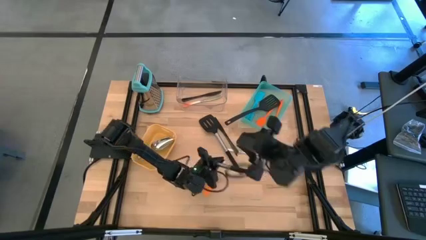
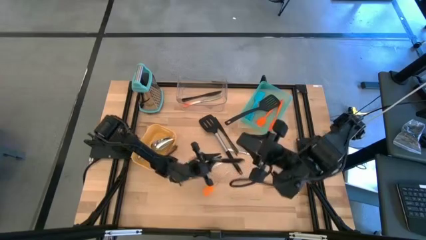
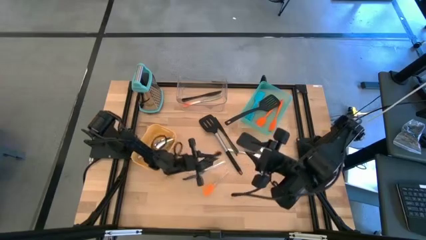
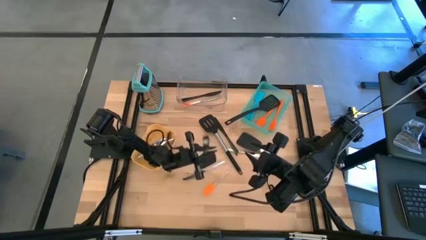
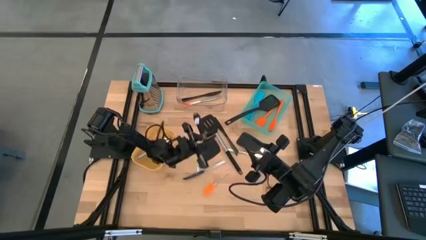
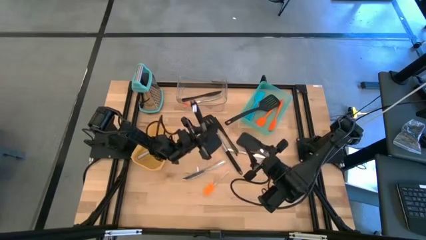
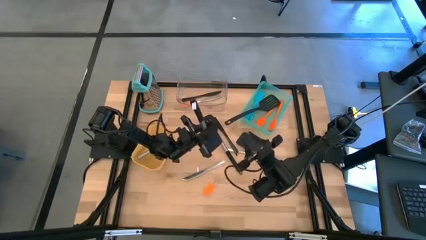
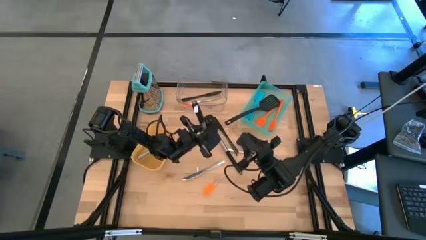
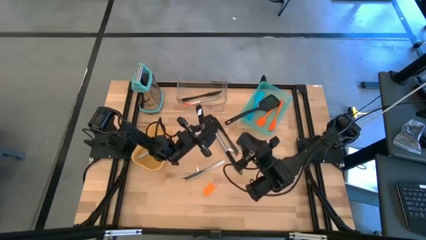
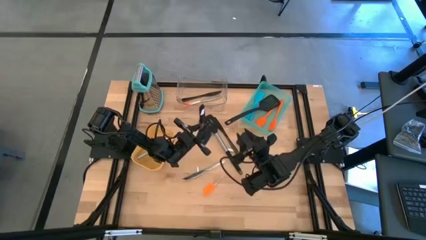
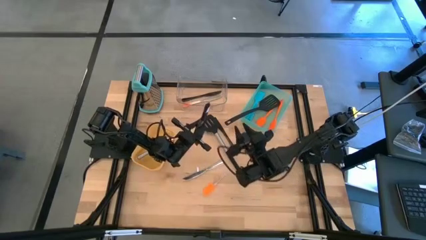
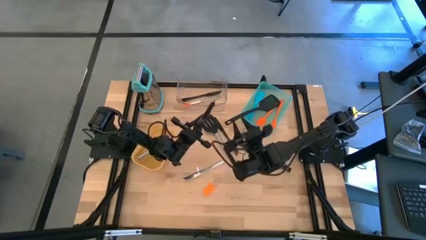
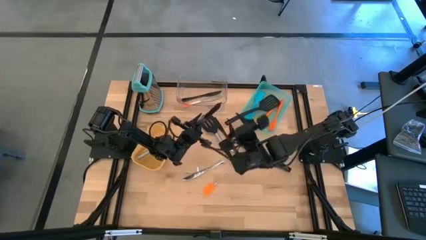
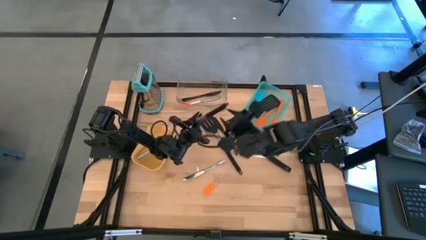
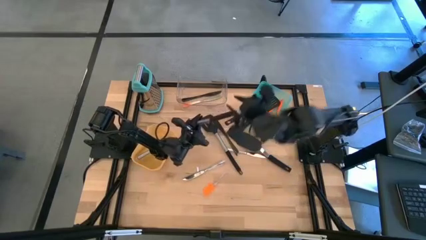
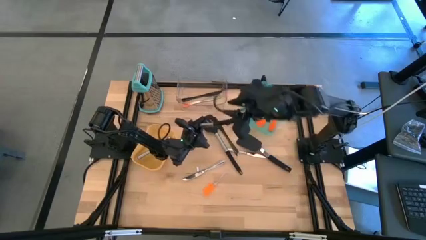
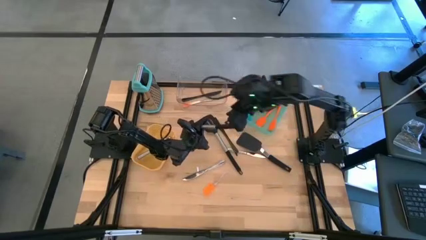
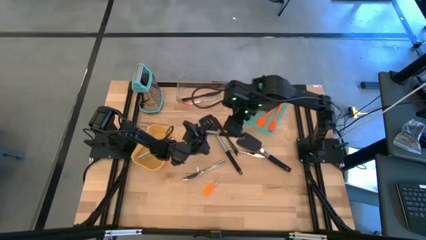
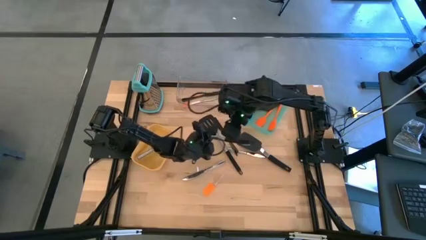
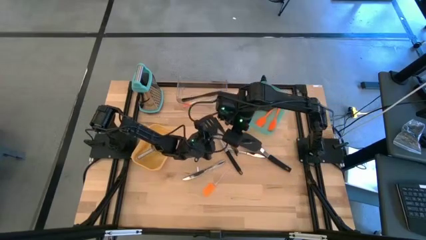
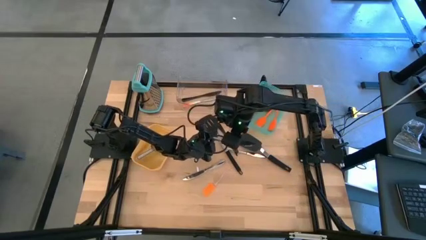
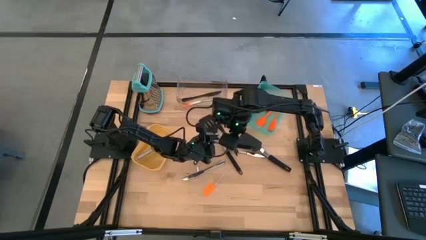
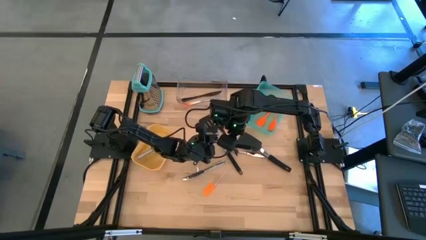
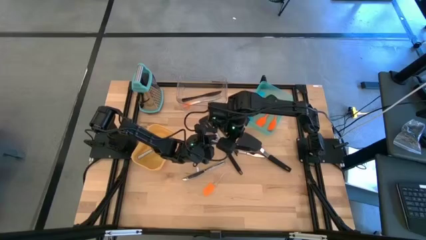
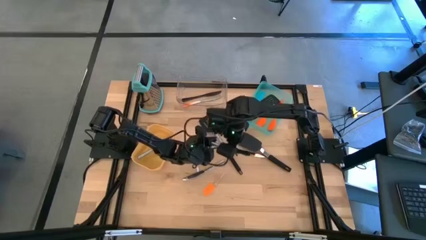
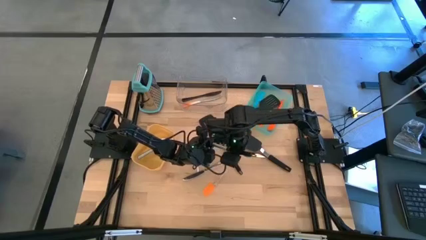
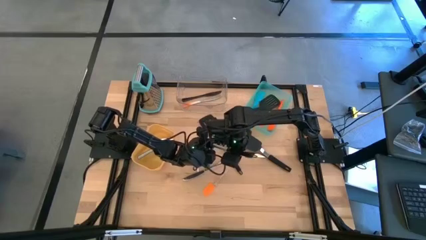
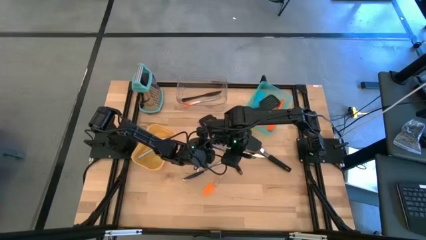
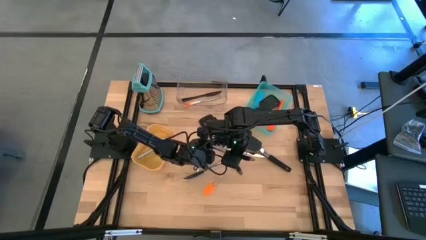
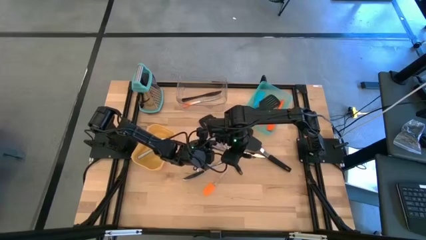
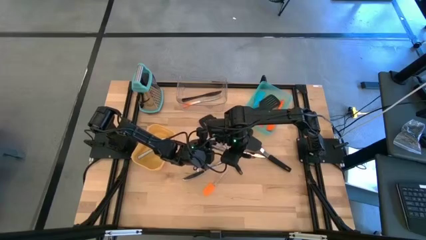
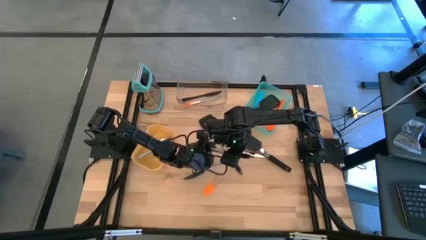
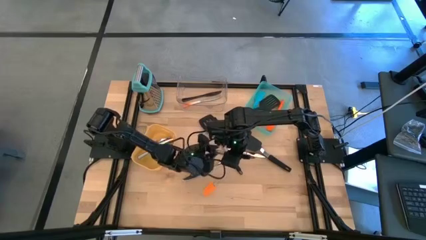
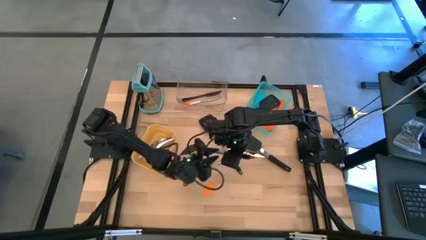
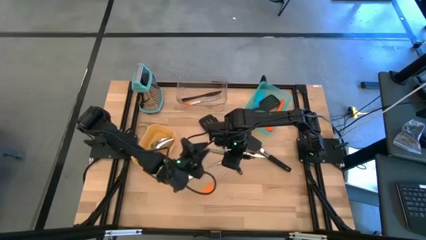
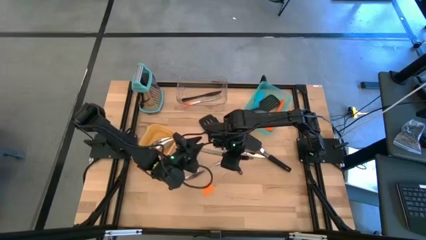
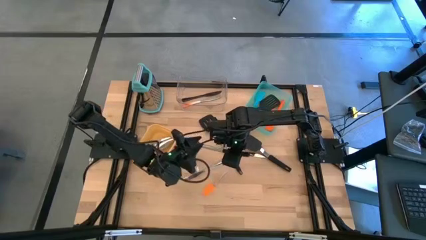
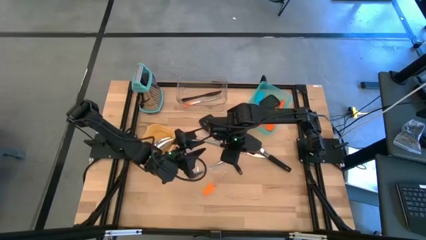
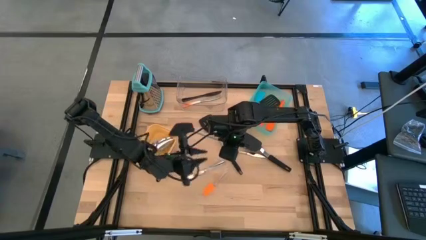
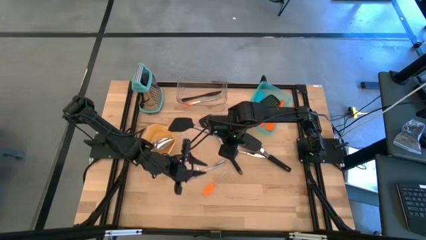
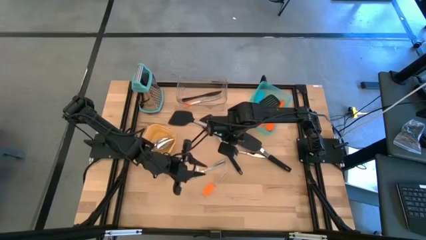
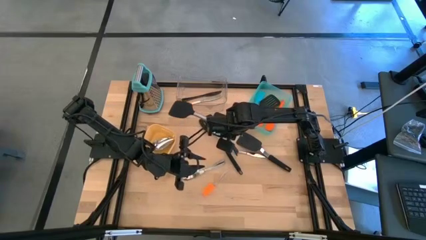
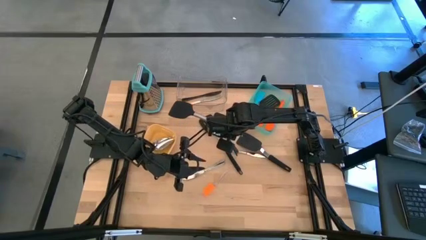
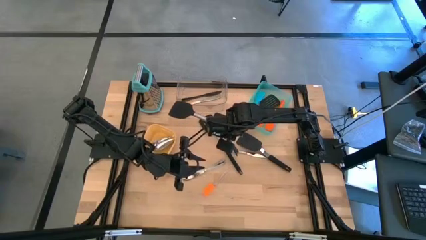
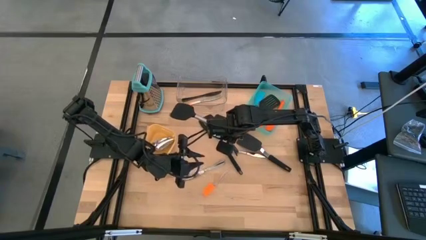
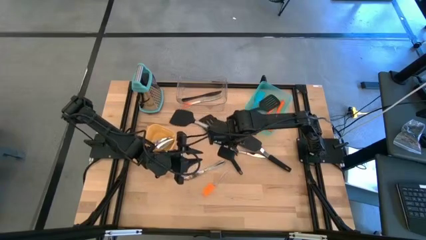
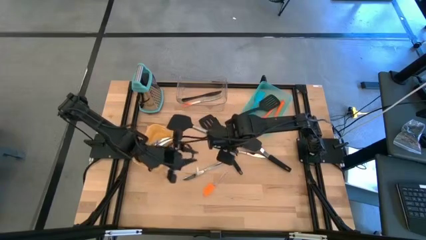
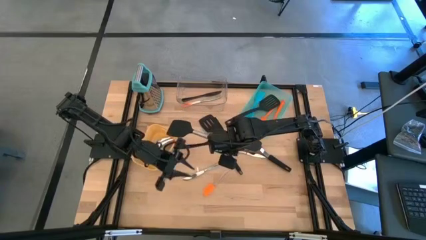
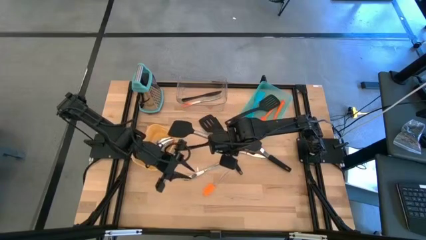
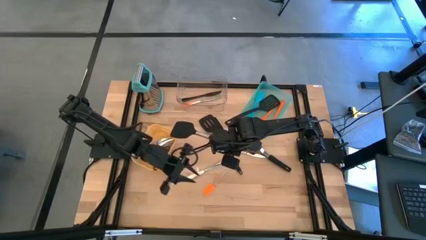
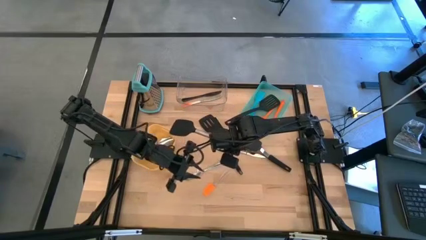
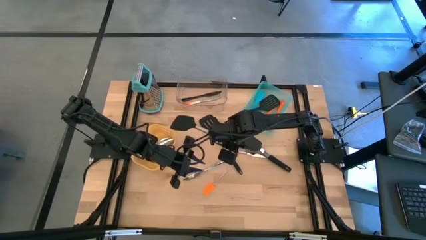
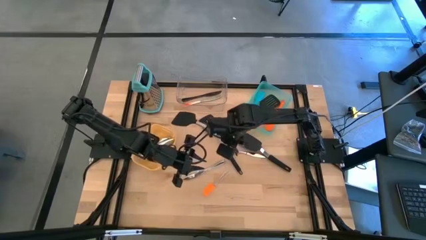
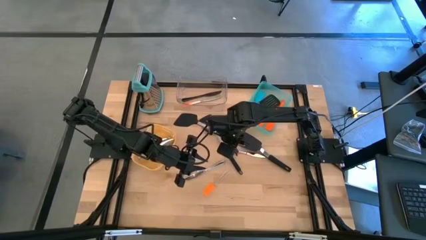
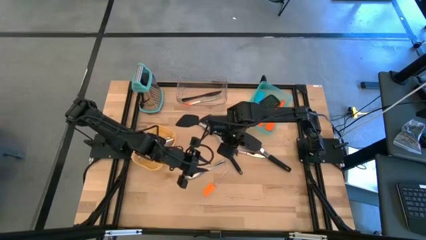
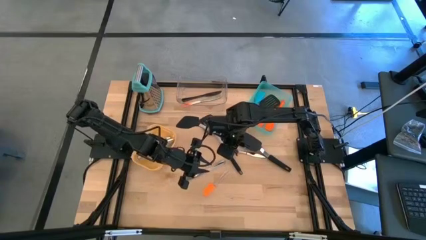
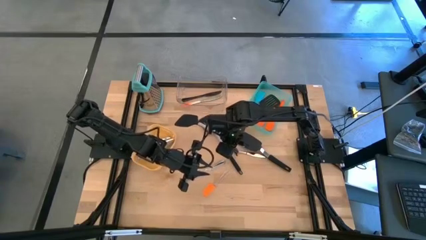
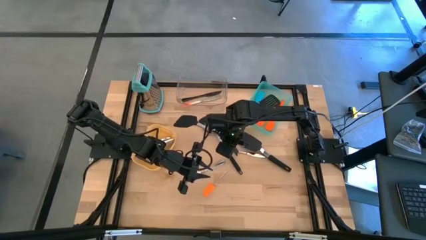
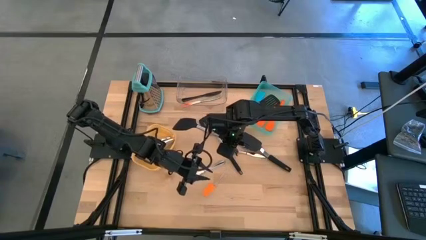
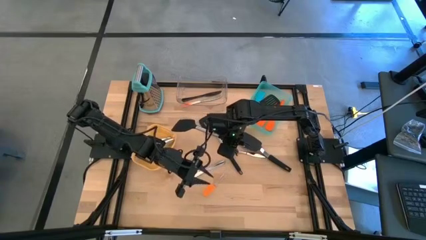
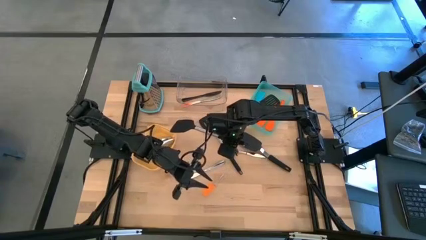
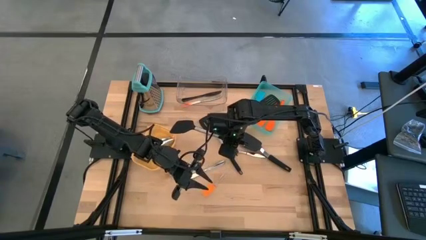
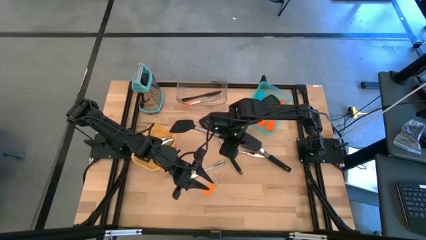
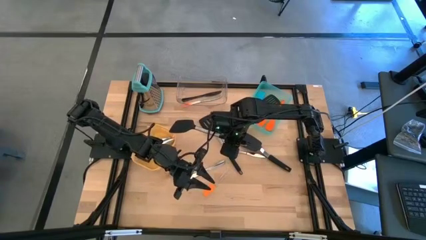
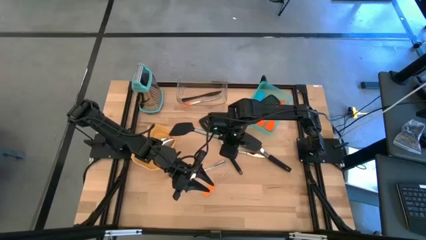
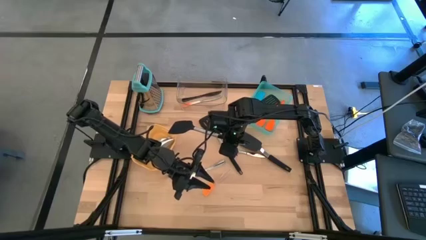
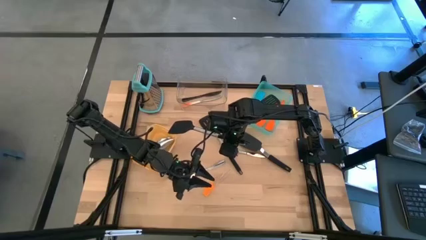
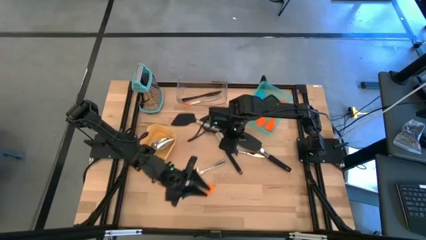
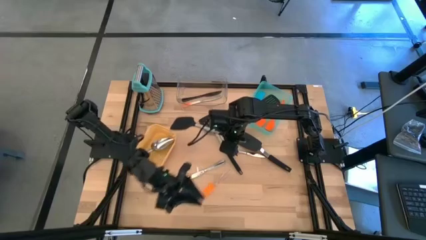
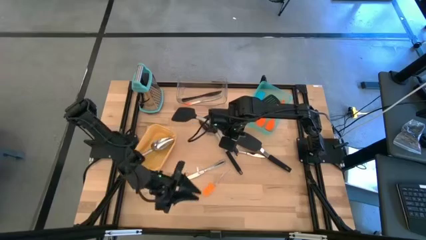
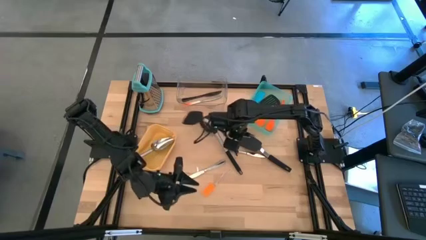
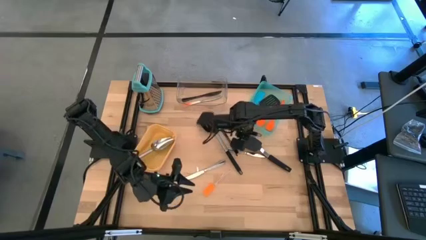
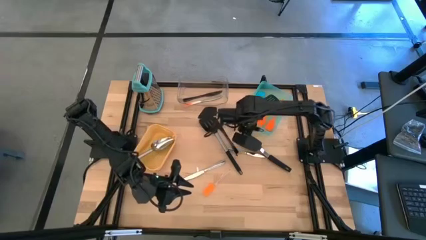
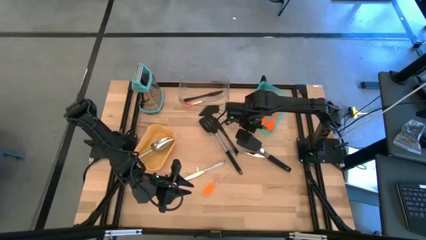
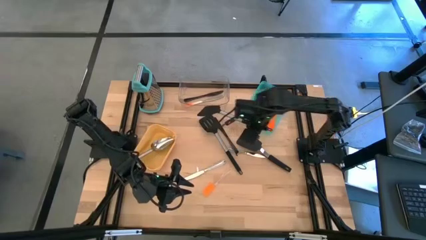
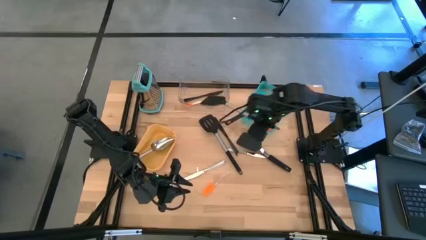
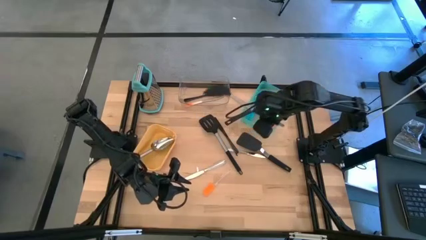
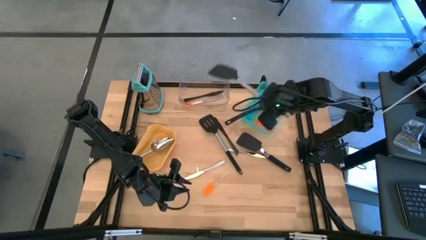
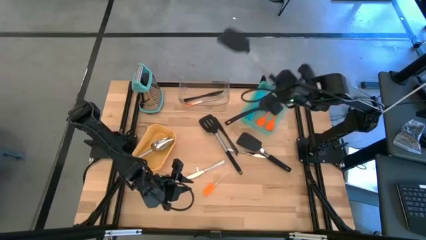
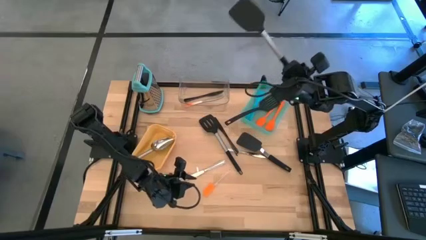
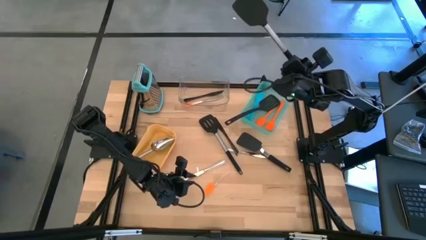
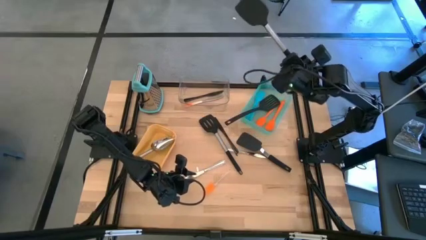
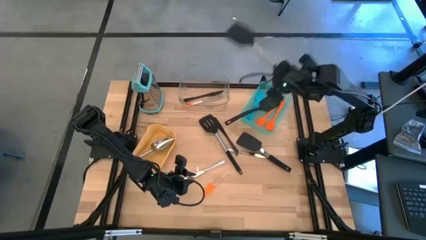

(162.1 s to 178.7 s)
Task: Pick & Place Kitchen Items
Put the black spatula into the green bin
